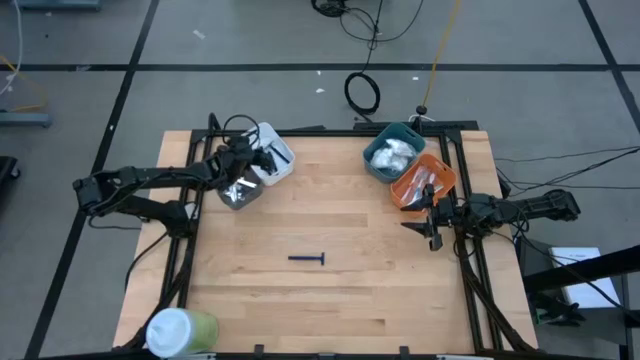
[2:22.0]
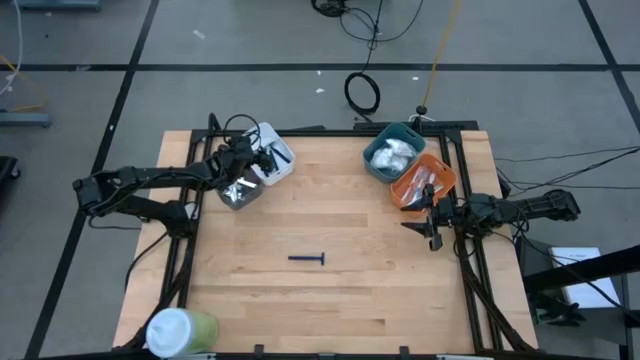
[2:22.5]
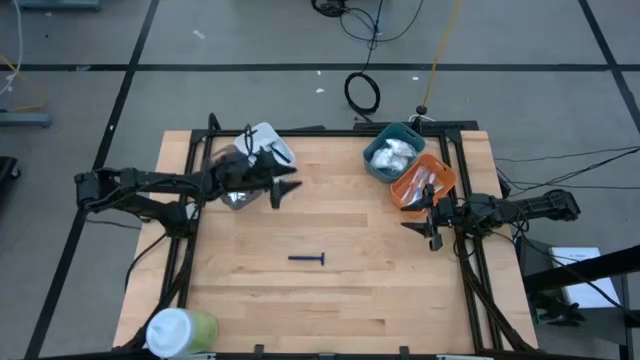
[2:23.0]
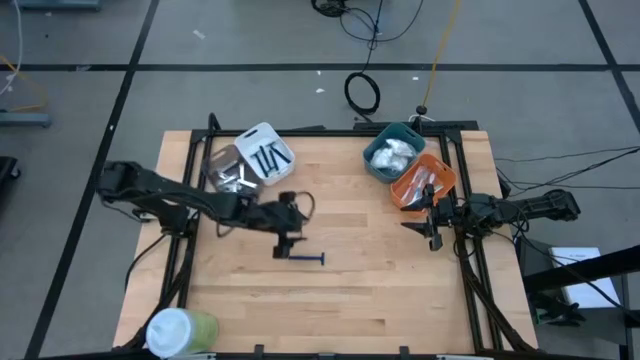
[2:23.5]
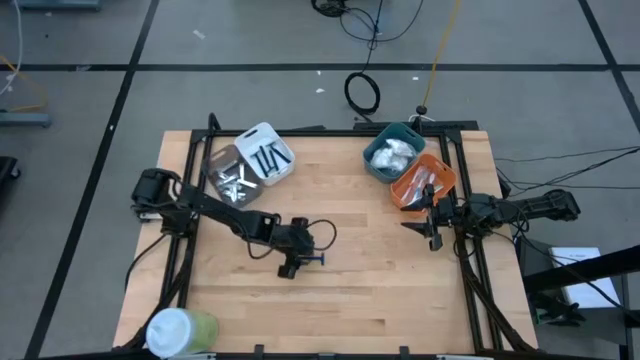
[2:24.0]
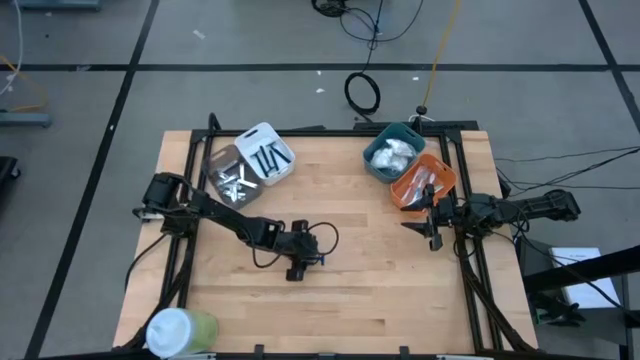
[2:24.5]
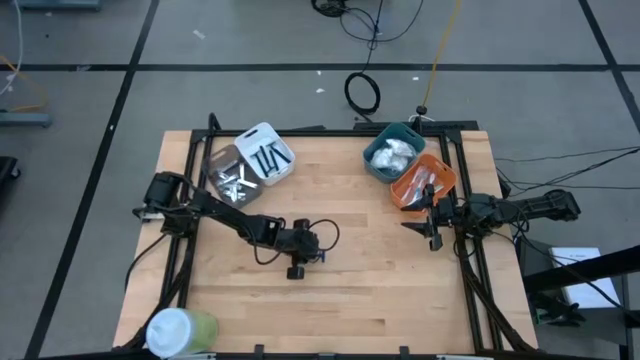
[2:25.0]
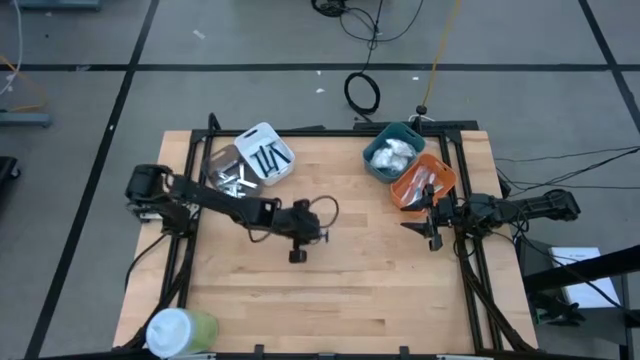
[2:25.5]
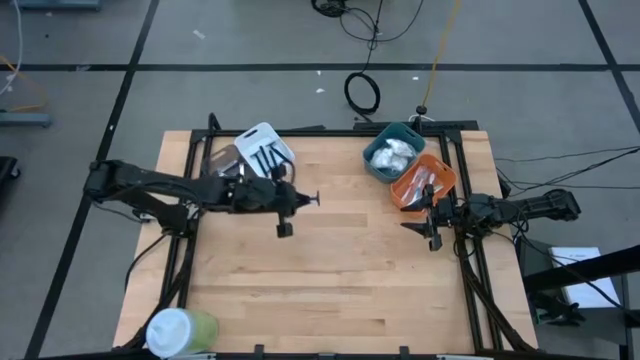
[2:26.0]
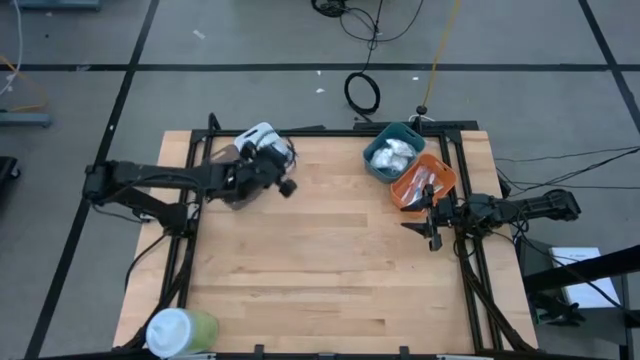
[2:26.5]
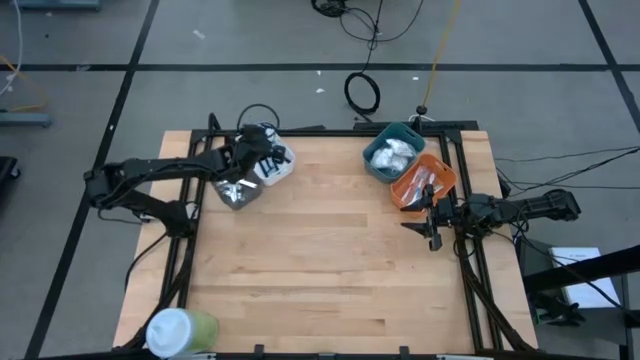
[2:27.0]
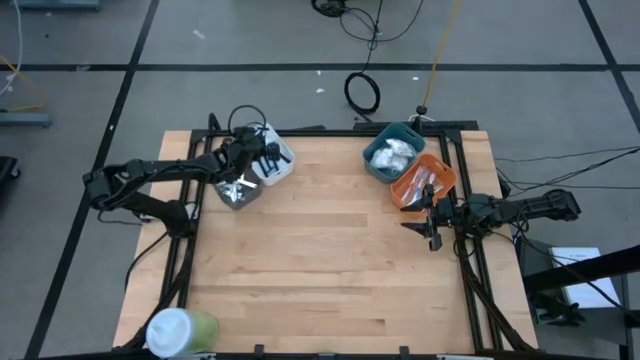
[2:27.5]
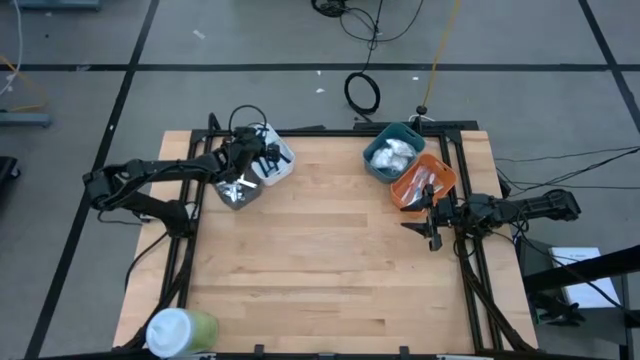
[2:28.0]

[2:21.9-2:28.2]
Task: Pick & Place Travel size toiletries
Put the blue razor into the white bin

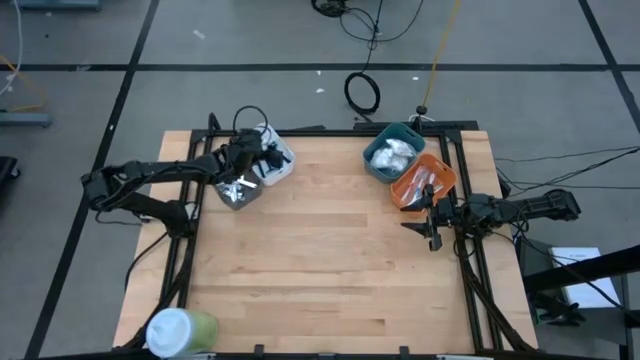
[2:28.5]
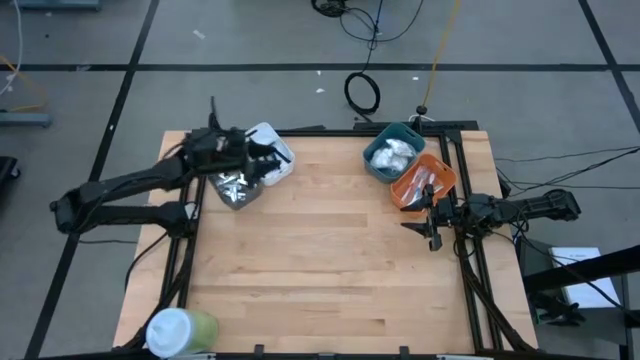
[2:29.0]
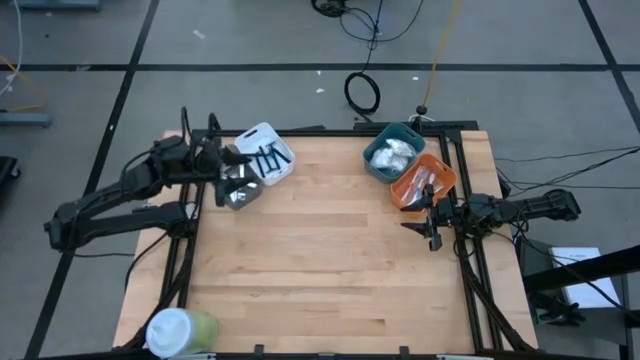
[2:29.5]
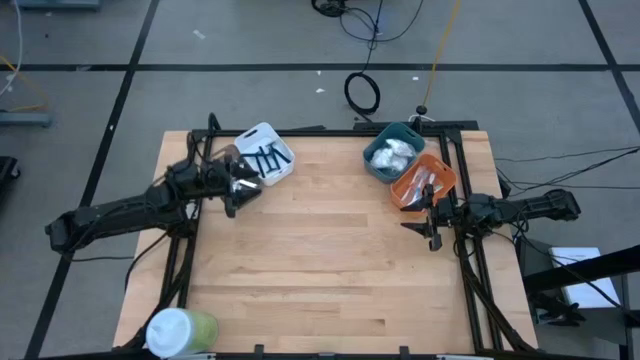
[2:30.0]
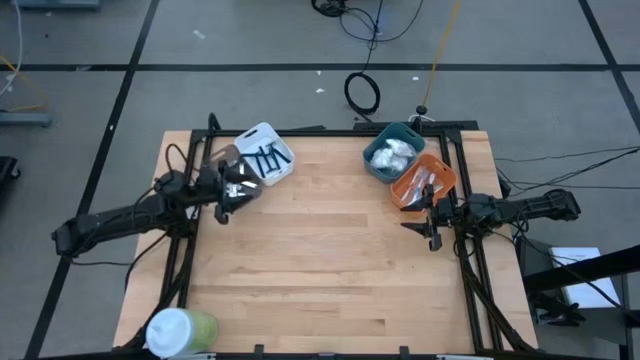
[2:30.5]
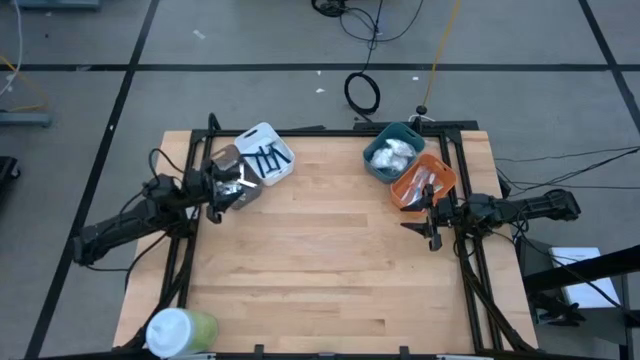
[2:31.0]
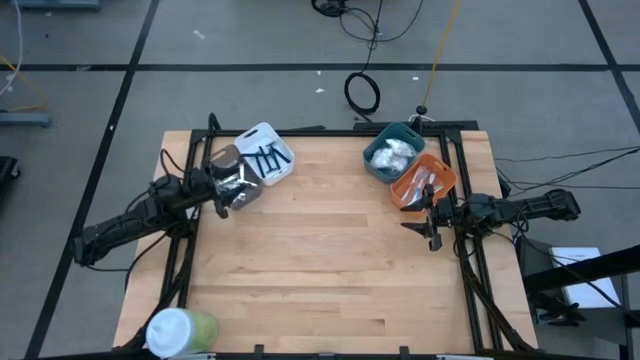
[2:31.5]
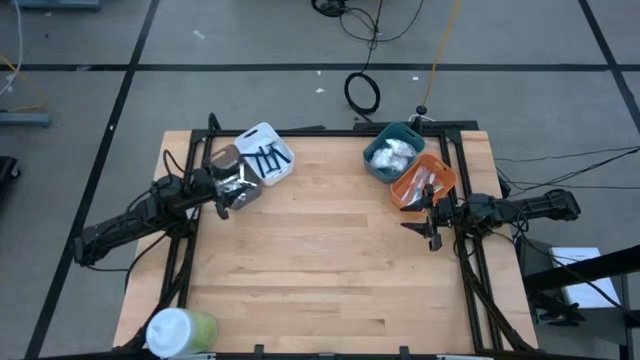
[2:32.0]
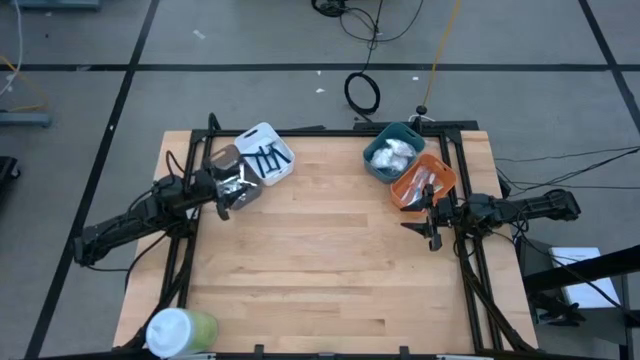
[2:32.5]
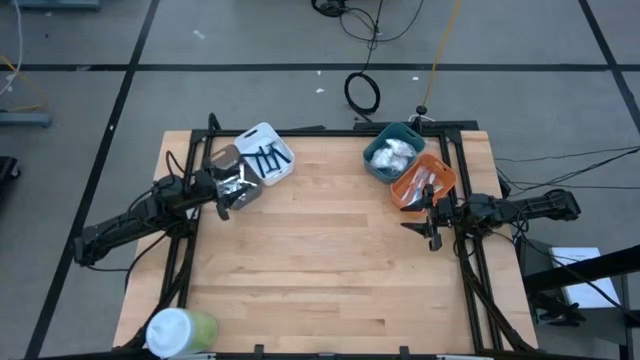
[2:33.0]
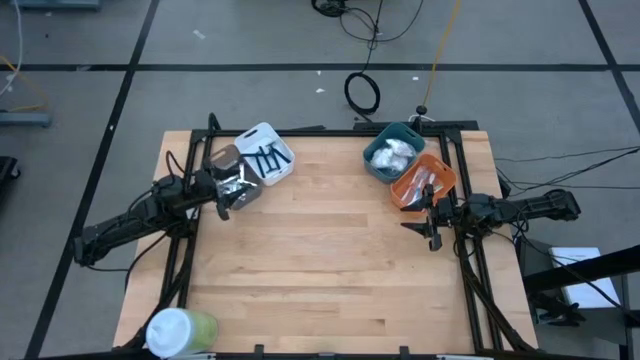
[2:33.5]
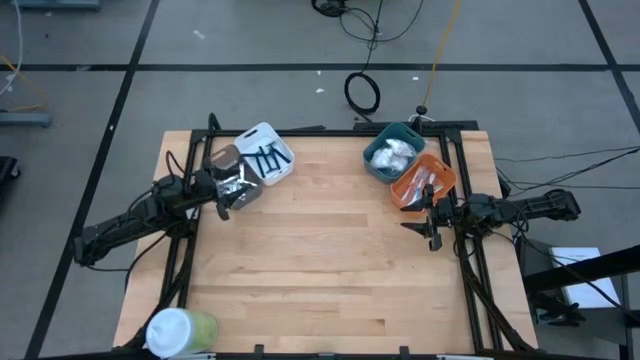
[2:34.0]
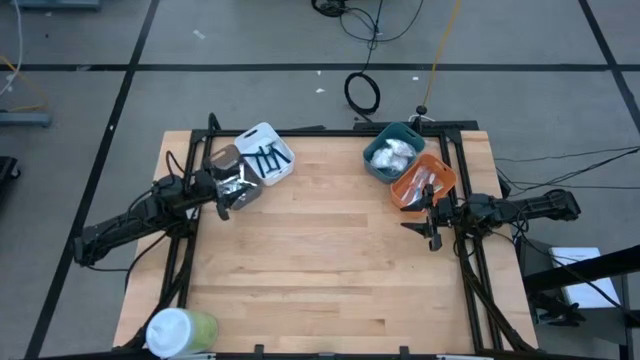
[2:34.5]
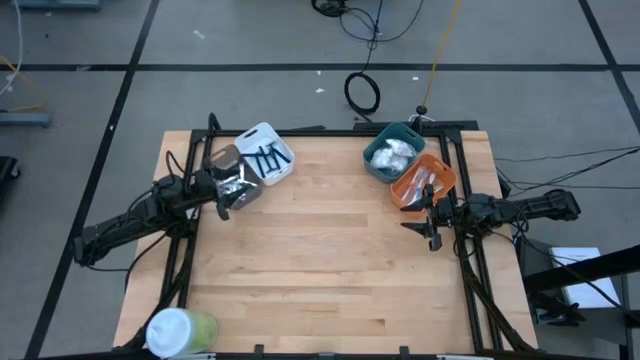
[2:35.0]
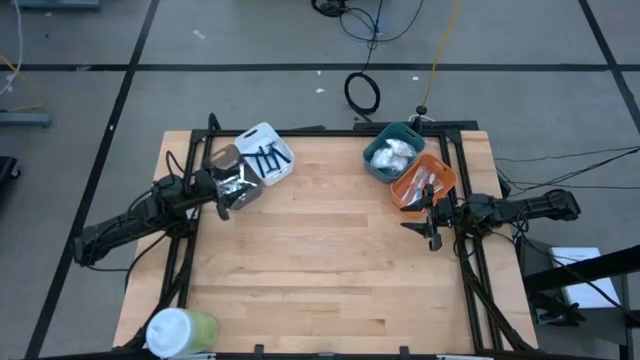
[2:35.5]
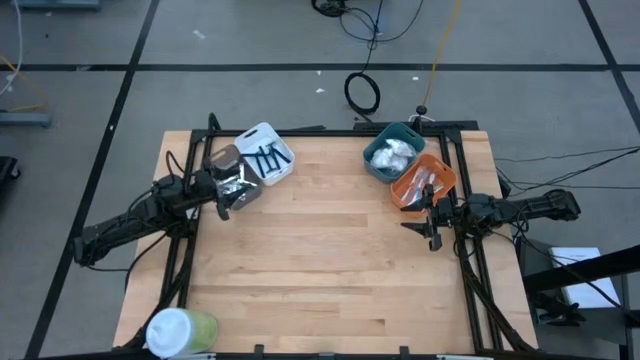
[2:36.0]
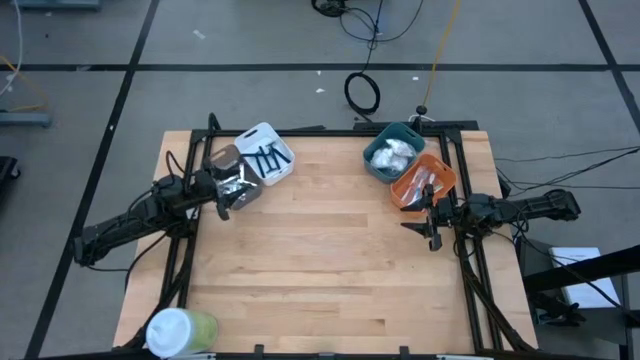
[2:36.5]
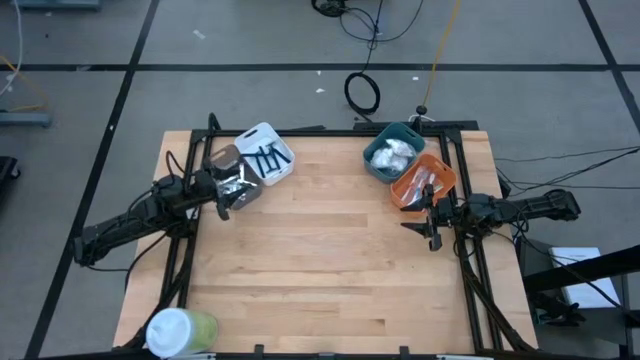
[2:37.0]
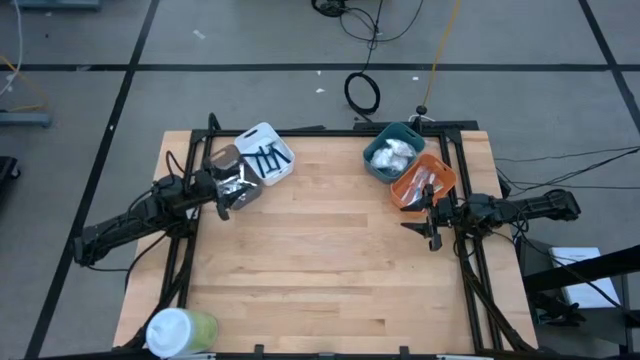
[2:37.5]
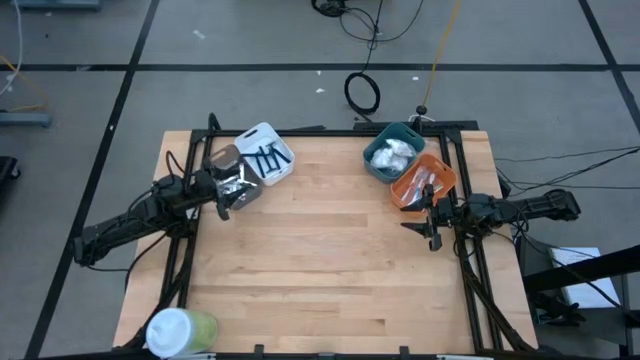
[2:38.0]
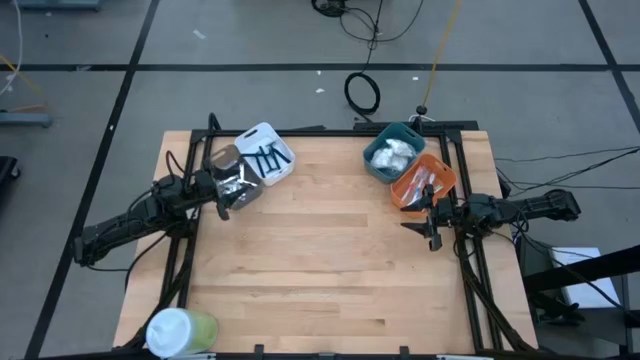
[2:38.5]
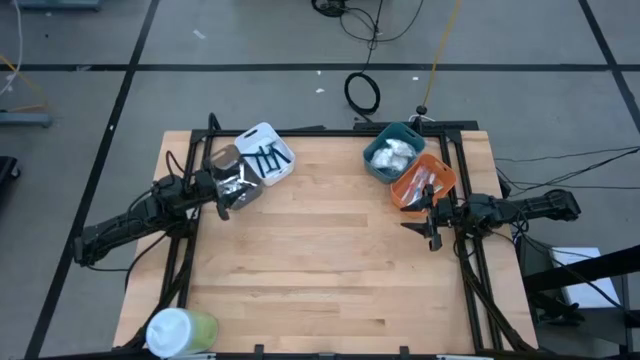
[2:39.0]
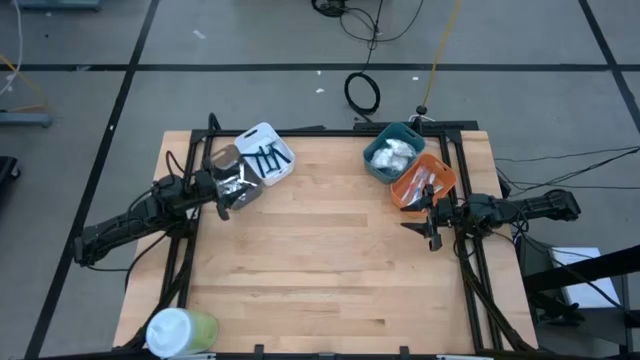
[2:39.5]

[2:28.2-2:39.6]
Return to Home Position
